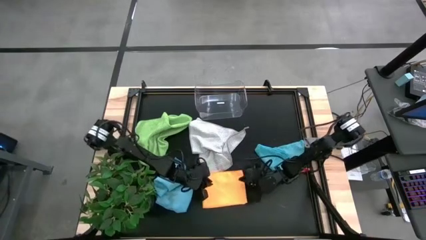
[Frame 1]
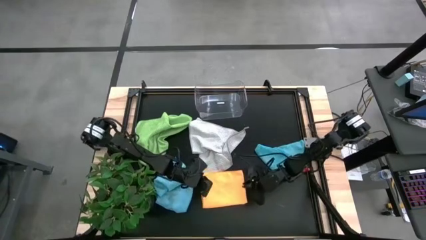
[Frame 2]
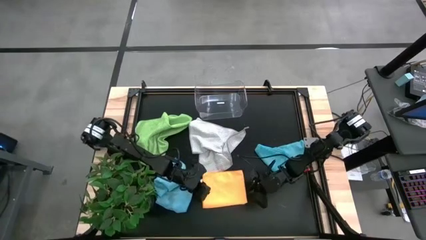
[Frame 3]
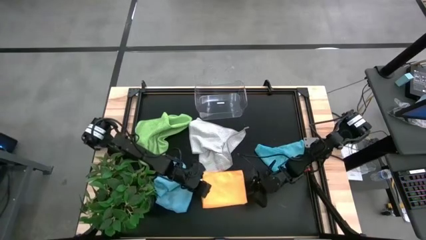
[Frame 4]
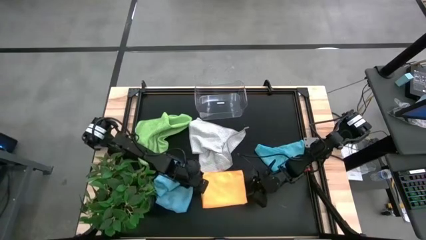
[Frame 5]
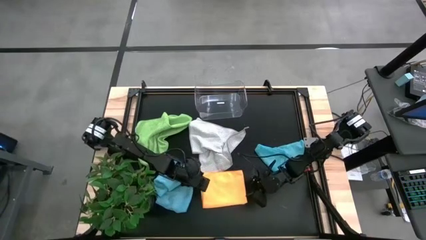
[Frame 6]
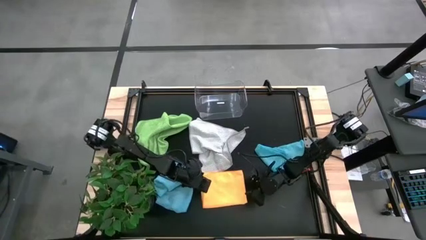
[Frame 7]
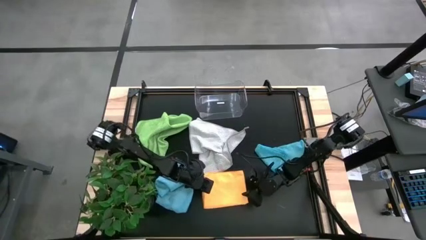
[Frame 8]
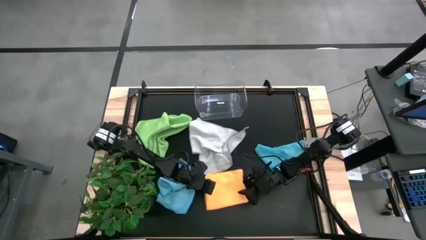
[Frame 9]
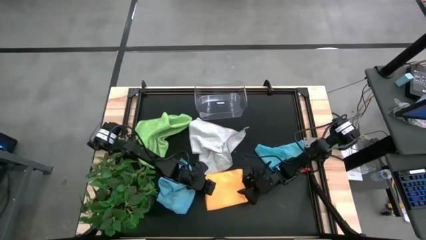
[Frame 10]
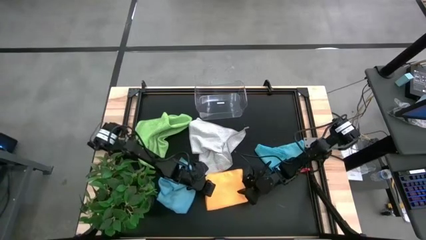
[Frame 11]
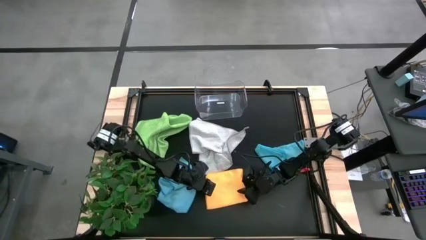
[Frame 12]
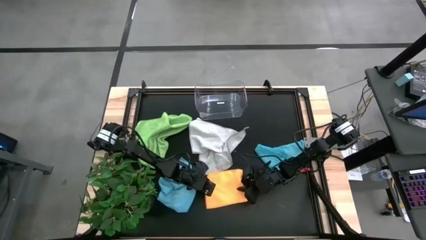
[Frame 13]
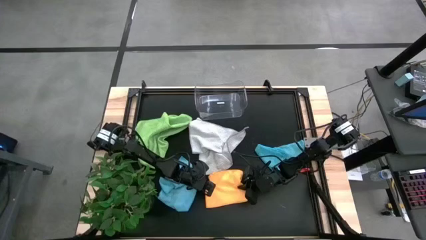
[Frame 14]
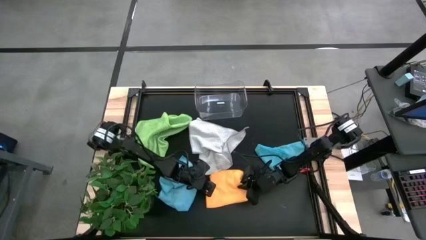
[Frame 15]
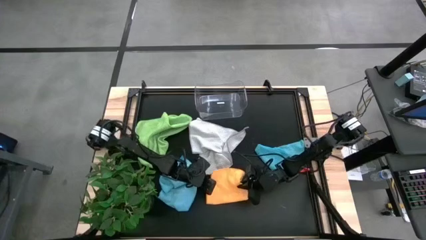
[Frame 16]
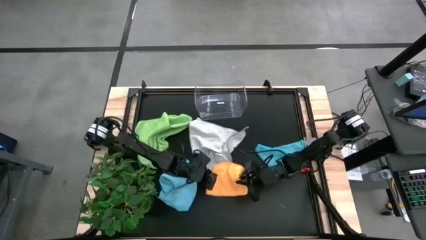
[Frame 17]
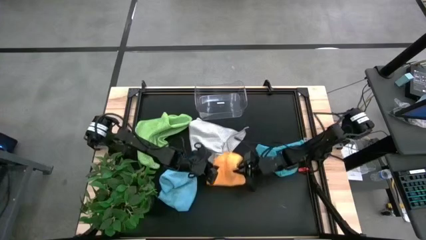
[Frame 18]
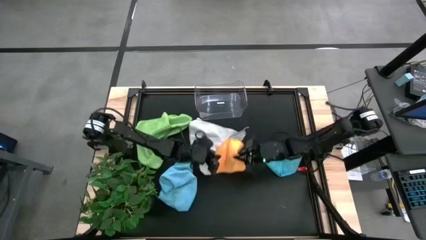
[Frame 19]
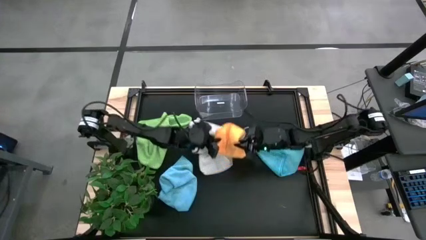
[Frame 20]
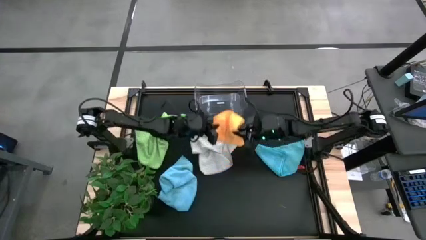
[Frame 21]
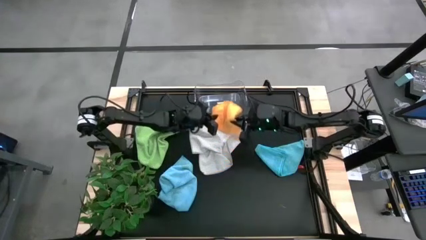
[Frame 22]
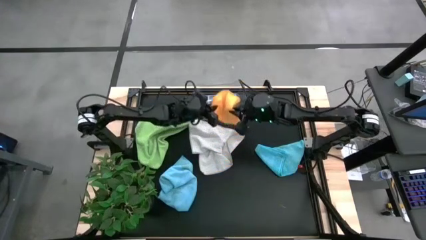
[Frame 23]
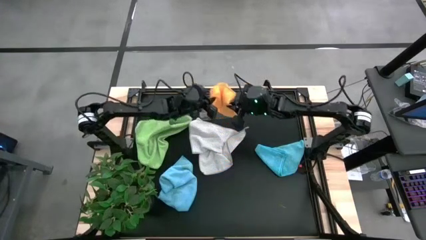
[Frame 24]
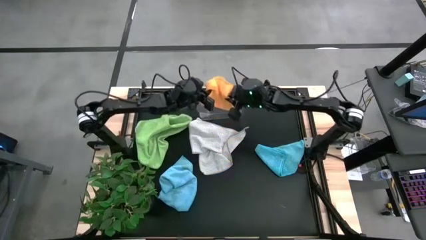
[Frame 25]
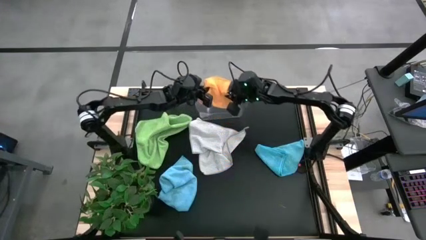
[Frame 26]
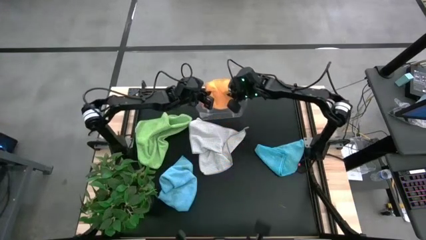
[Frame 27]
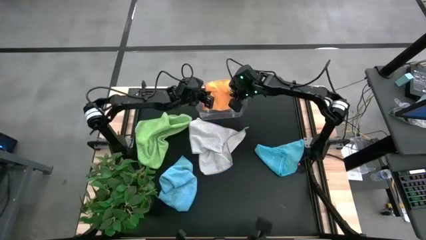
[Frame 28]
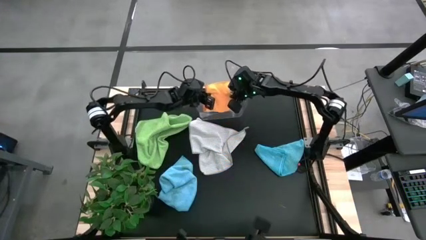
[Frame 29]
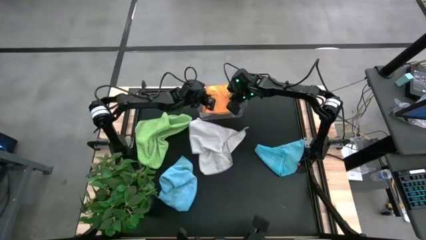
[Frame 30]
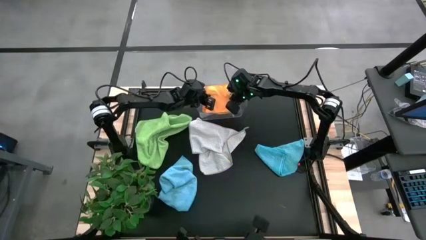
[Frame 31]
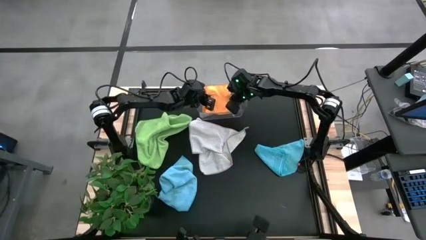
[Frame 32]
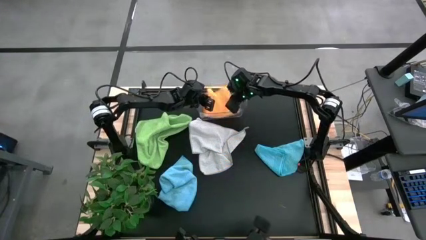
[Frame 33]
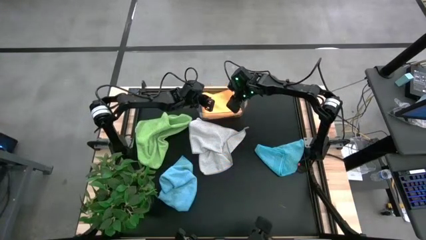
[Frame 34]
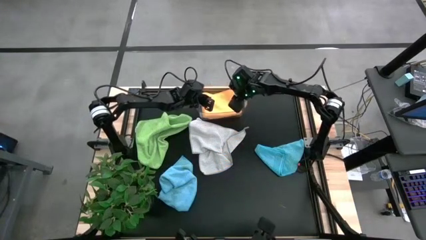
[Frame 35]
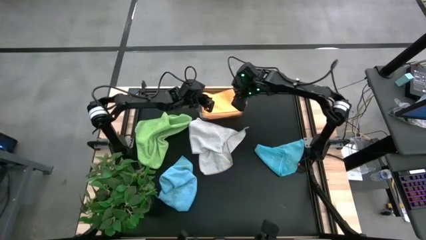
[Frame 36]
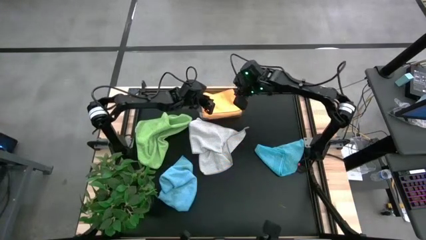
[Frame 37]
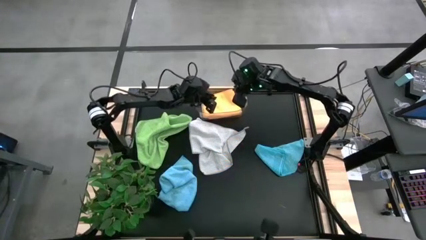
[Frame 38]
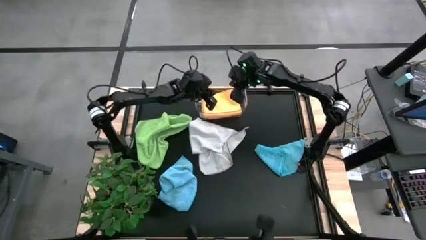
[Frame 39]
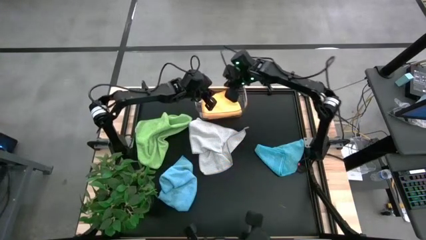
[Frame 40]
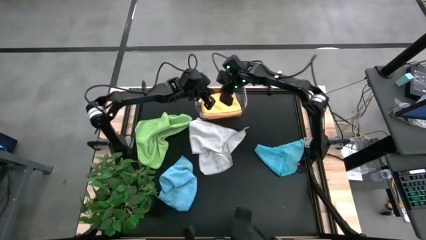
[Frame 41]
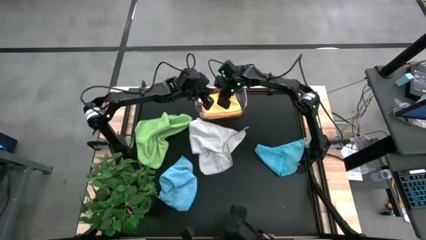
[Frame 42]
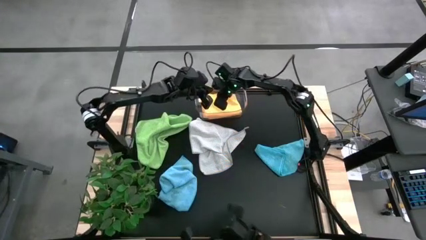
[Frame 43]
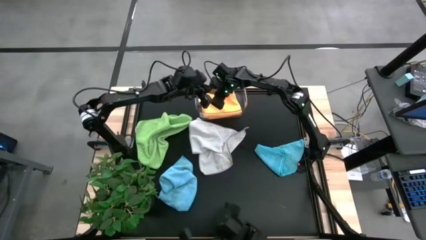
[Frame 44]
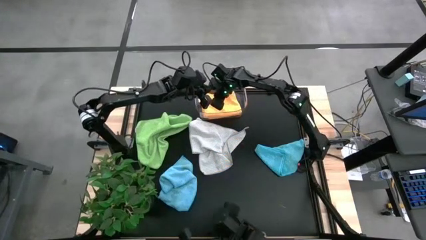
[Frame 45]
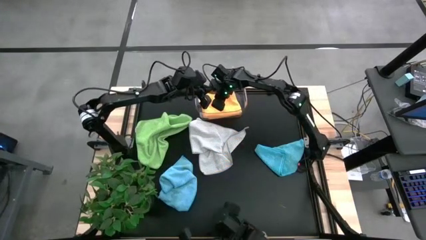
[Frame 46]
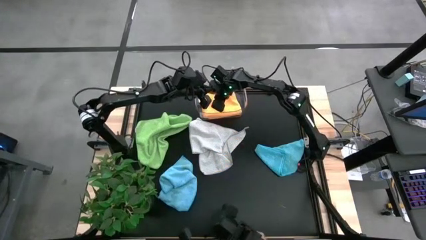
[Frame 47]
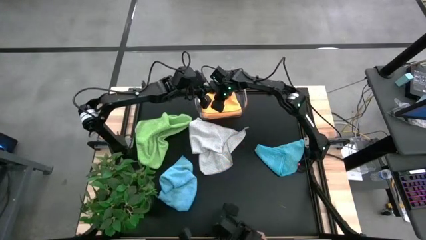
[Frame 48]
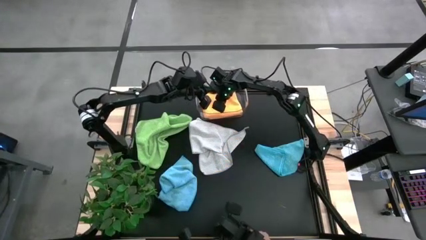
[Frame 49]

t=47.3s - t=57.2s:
Task: Fold microfiber towels
Put the orange microfiber cloth into the transparent bin

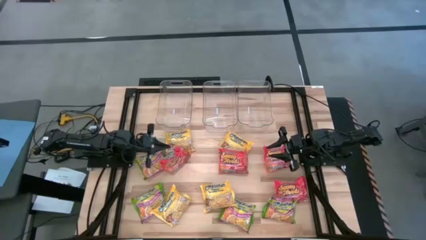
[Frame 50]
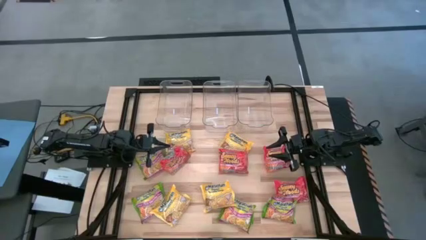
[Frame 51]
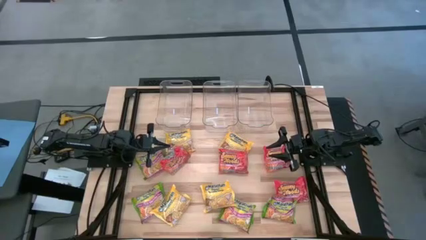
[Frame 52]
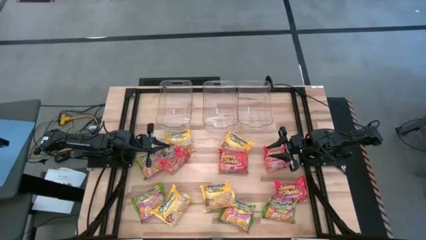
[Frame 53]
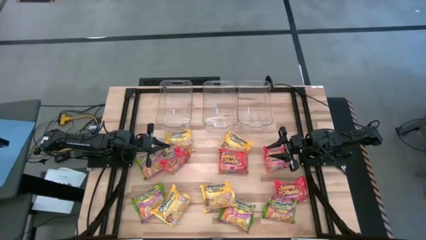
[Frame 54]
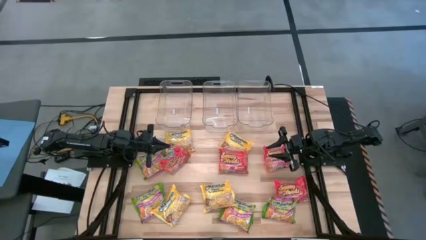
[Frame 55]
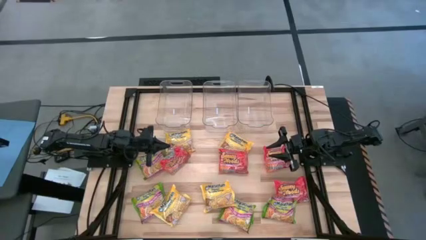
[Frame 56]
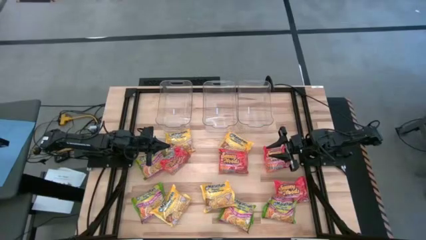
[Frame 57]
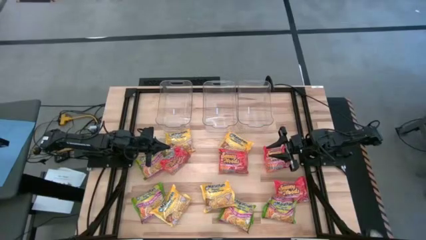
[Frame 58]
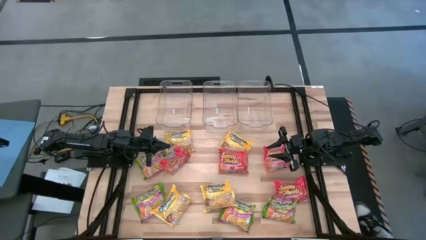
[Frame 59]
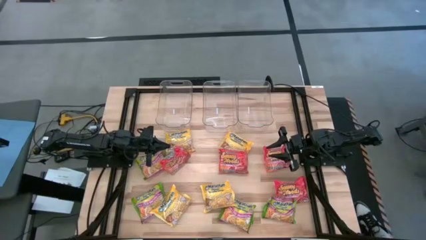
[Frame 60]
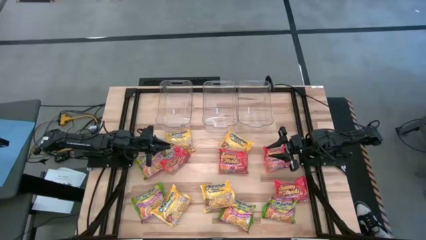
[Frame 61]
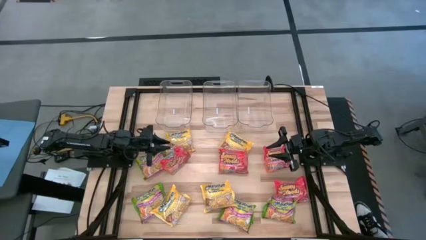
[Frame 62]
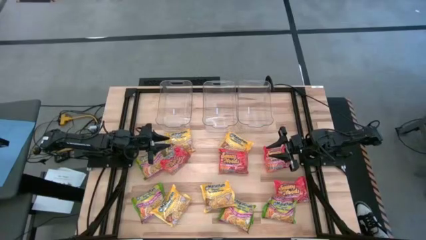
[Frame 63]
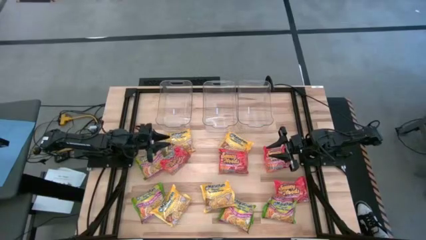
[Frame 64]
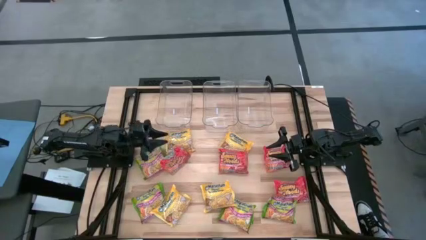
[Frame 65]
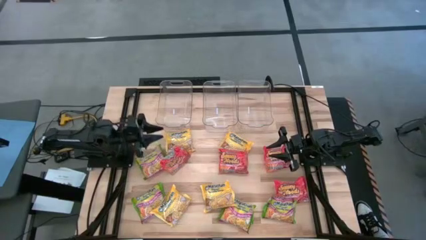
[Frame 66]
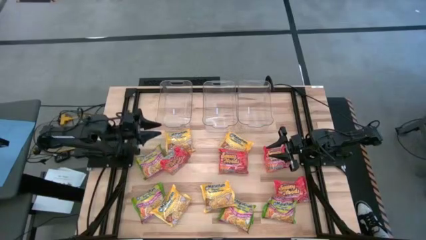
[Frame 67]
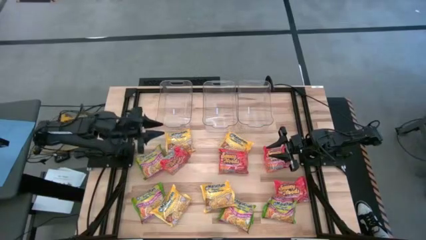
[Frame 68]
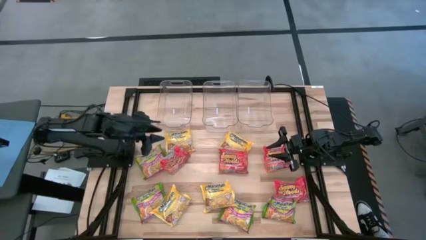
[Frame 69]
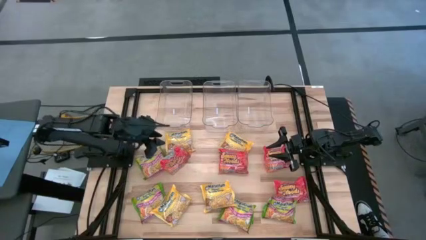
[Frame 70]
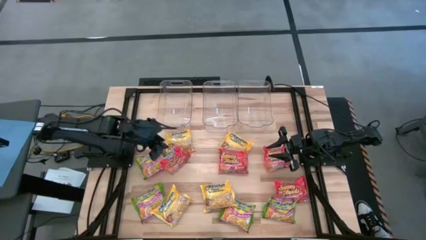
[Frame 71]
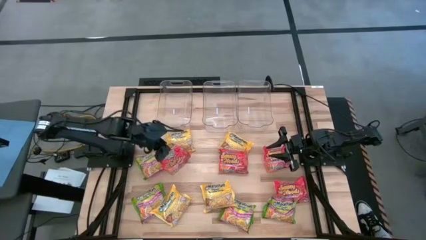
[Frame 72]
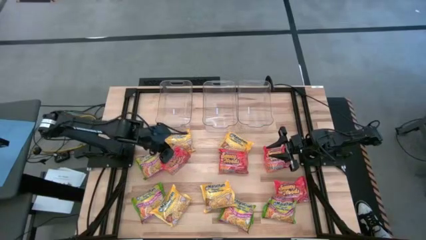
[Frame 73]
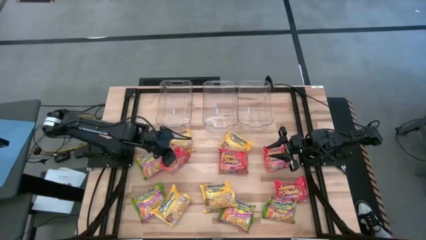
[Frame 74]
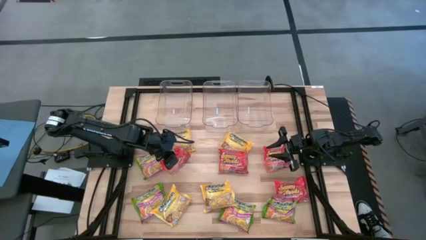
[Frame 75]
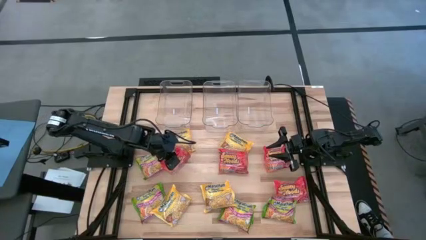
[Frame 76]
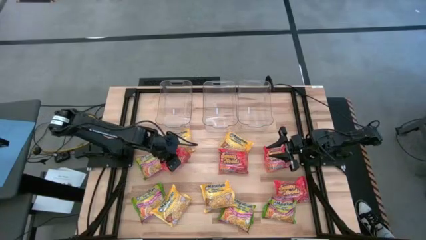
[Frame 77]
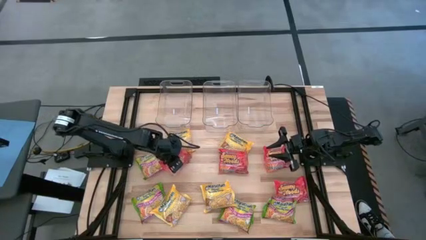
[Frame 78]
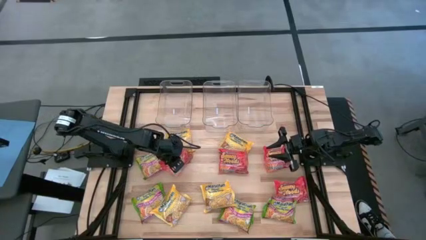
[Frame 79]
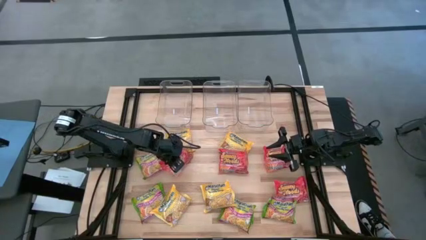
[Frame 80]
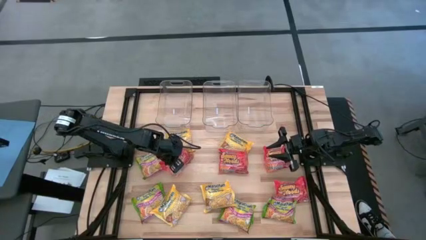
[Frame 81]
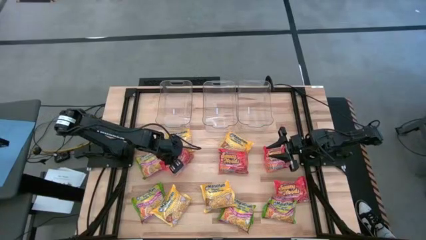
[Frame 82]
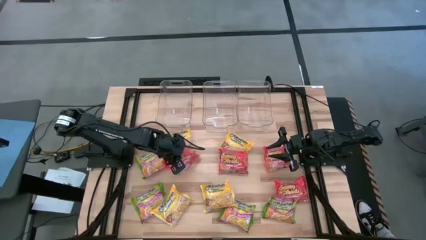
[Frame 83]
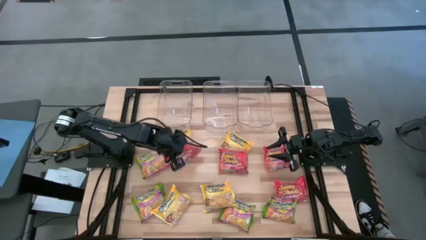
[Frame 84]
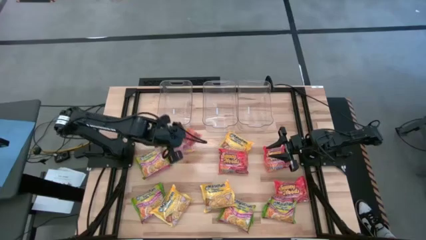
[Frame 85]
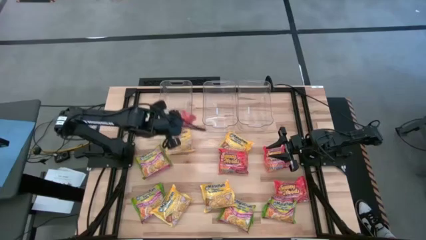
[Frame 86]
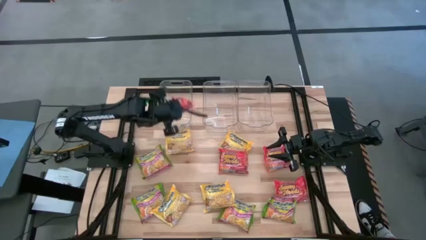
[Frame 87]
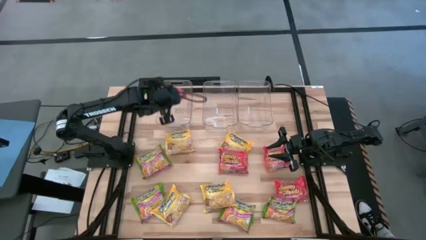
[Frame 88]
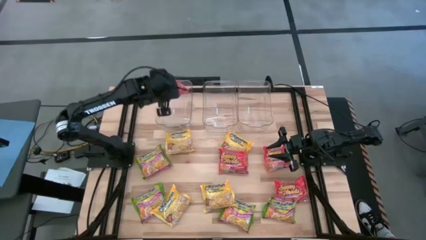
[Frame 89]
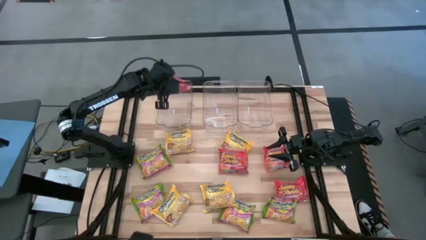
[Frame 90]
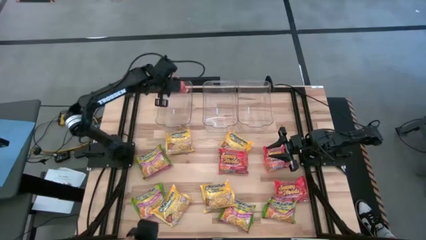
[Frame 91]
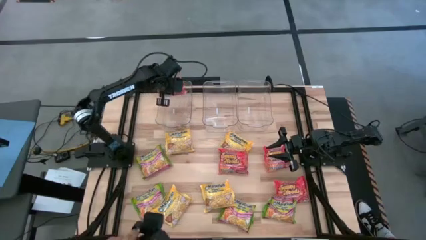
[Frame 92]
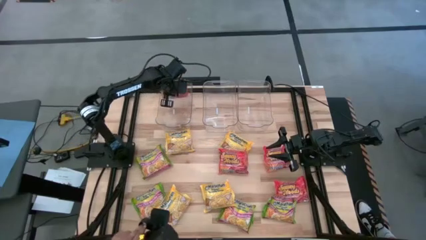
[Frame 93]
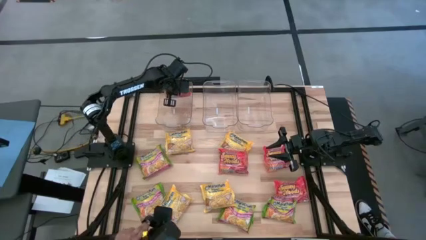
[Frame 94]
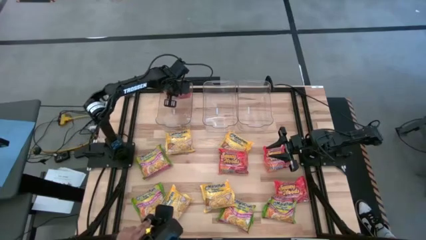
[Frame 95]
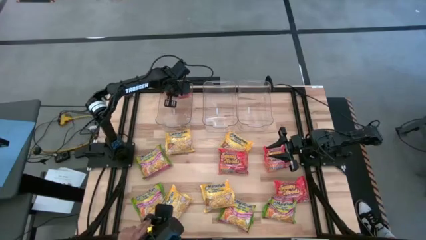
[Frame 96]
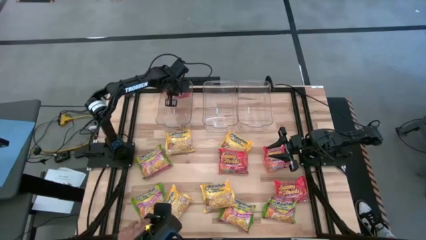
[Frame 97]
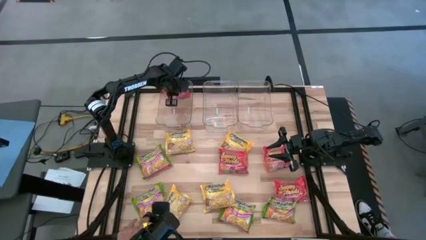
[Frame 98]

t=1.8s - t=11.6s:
Task: Sort Maruchan noodles
Put the orange noodle pack into the left transparent bin
